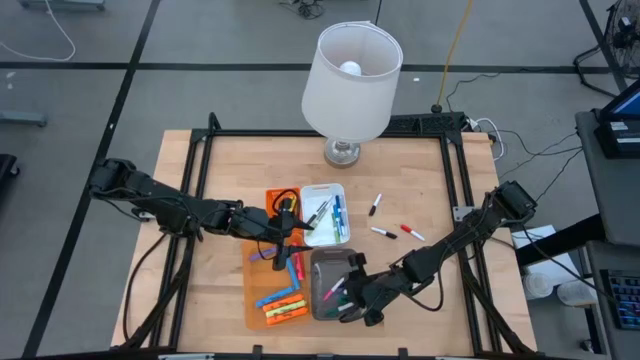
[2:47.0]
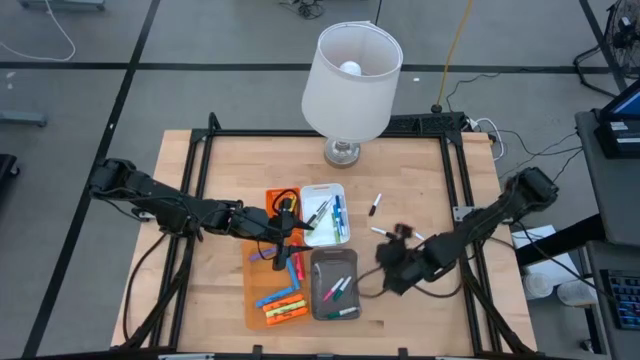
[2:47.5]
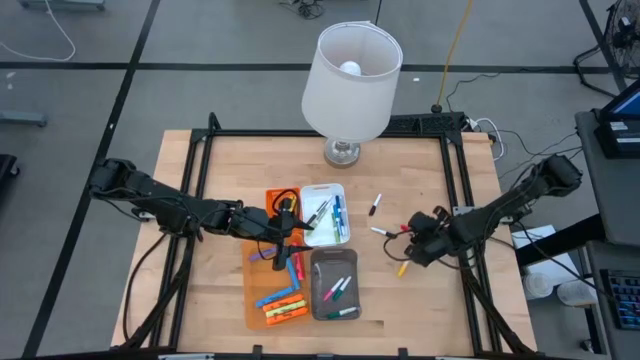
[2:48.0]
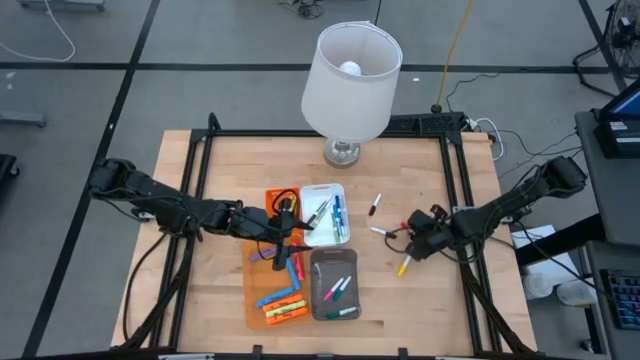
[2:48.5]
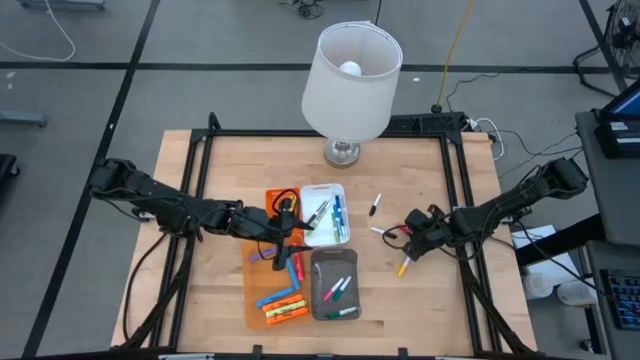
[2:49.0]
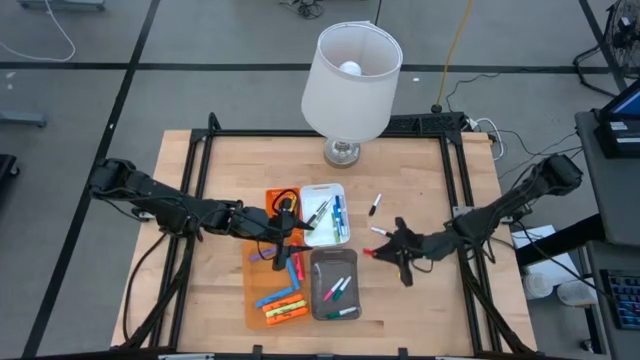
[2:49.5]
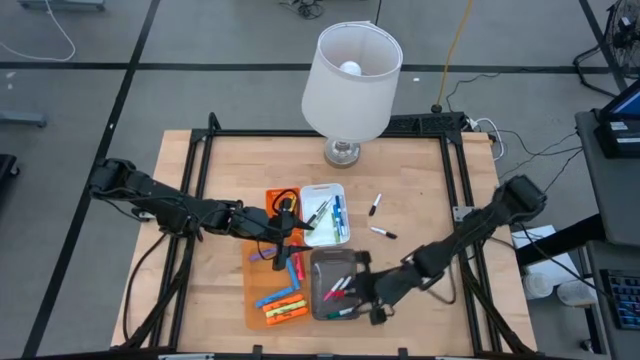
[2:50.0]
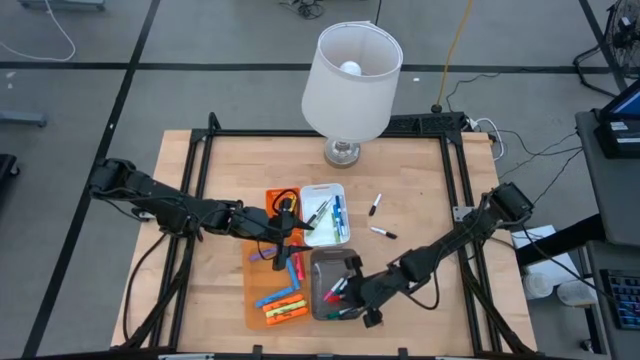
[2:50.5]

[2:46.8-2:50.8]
Task: Pick & Place Markers
Put the red small highlighter pen into the black bin

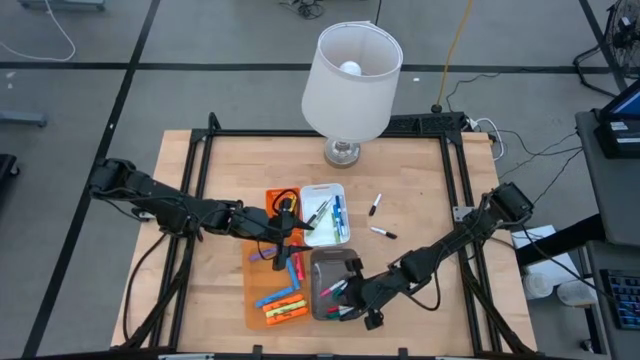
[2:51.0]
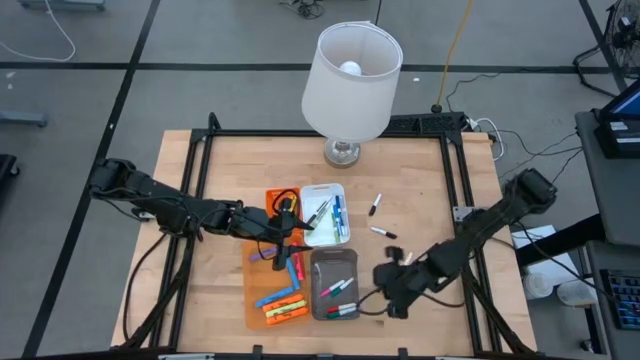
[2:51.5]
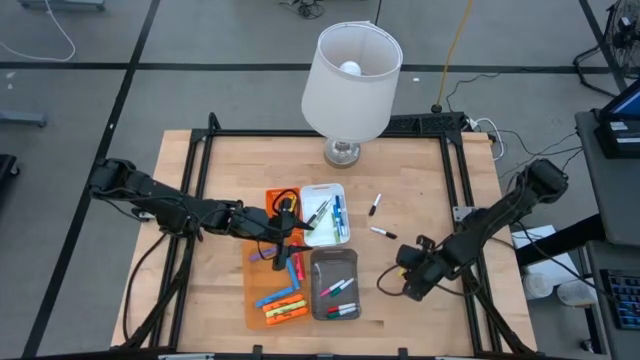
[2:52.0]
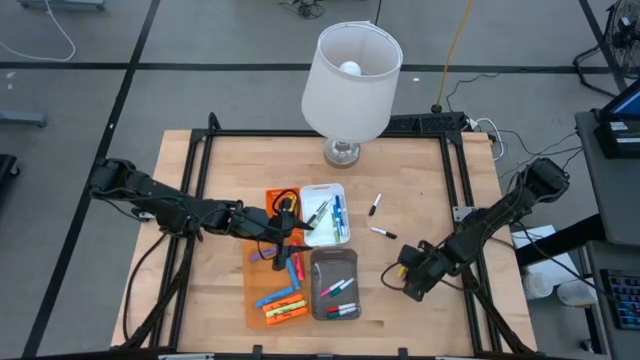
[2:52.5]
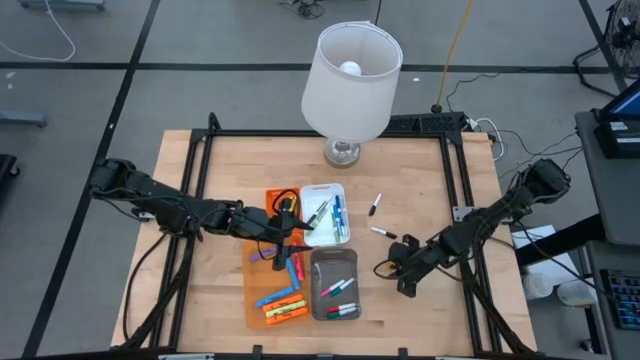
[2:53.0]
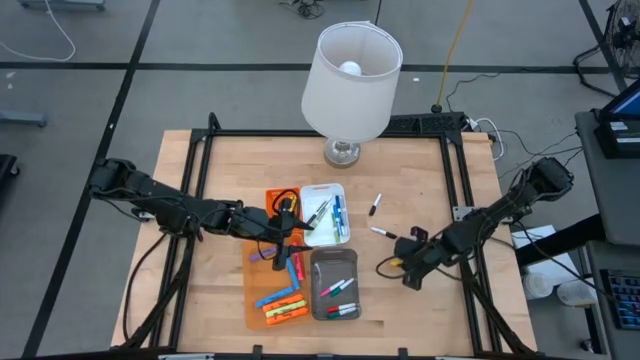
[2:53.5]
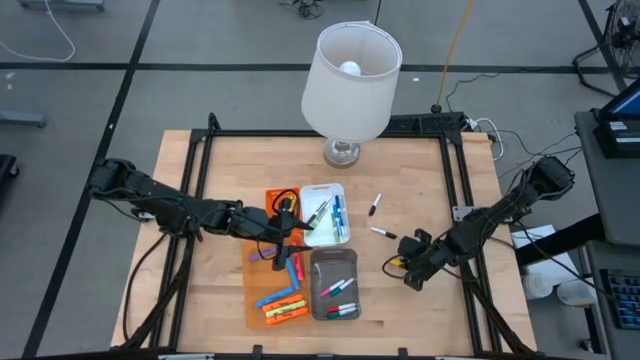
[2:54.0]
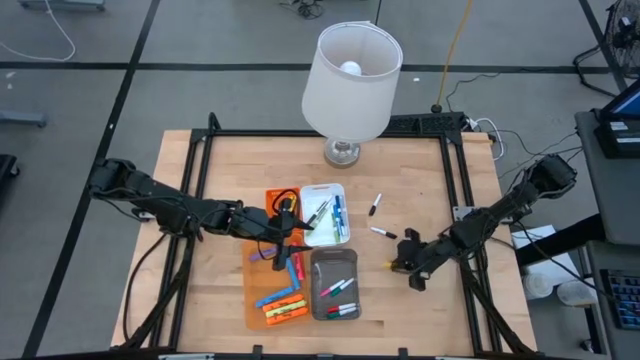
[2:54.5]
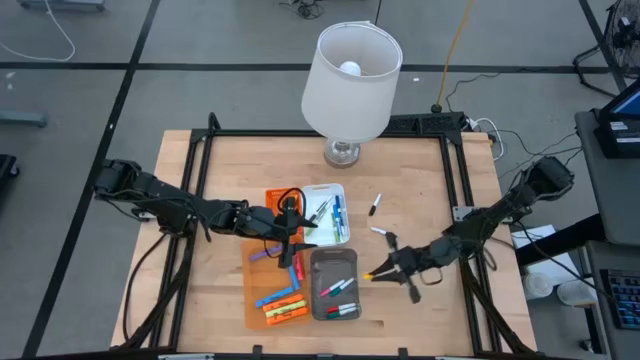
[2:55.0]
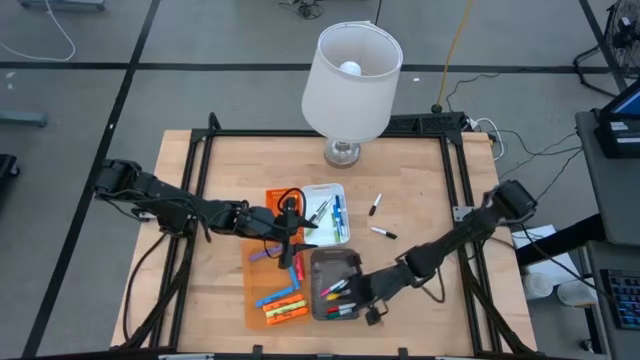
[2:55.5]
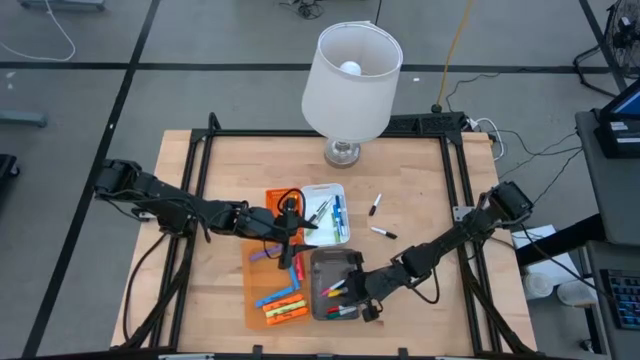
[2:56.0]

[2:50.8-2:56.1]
Put the yellow small highlighter pen into the black bin

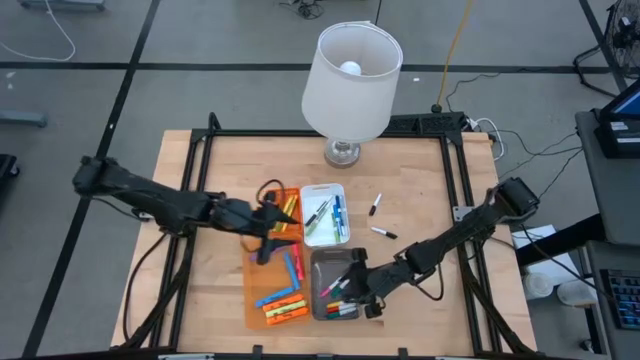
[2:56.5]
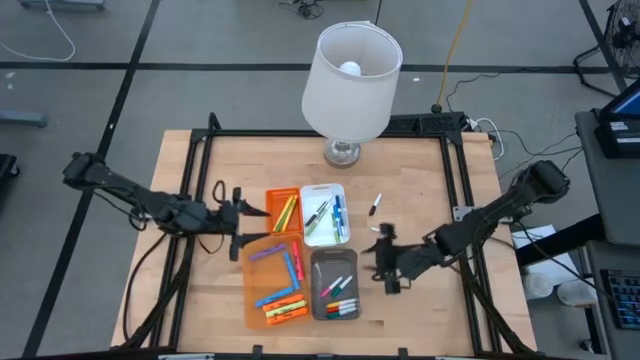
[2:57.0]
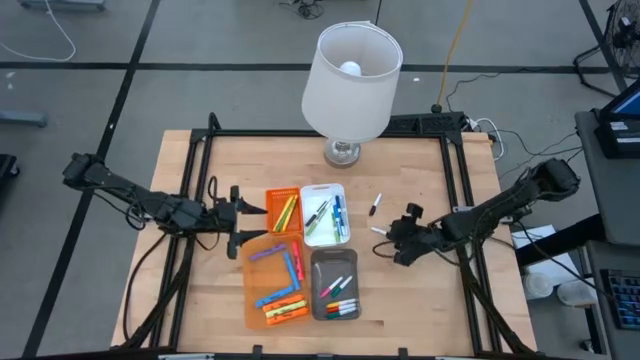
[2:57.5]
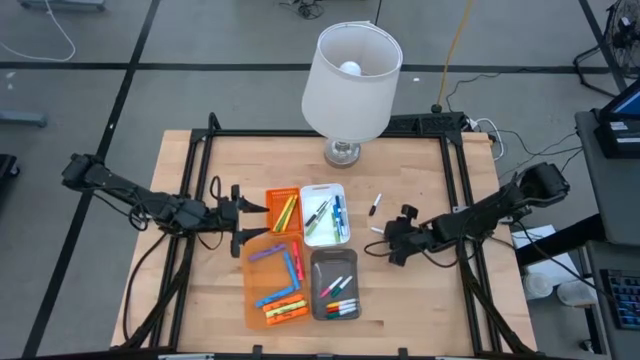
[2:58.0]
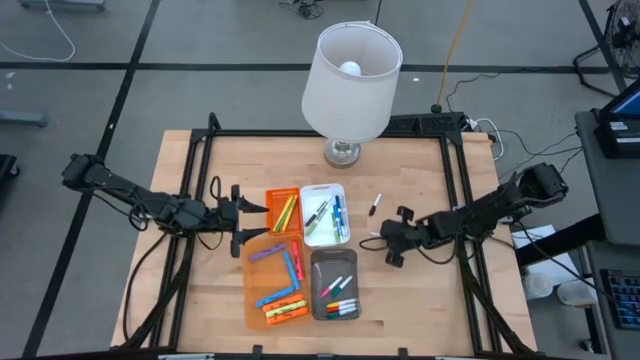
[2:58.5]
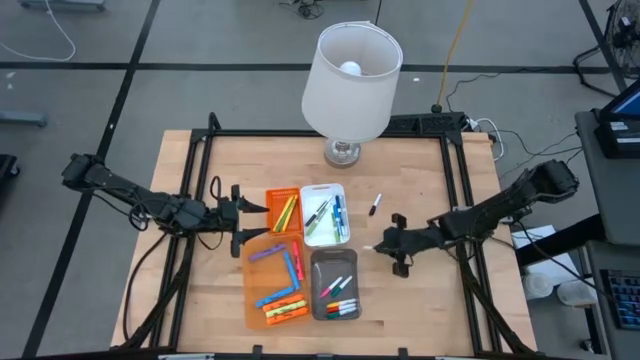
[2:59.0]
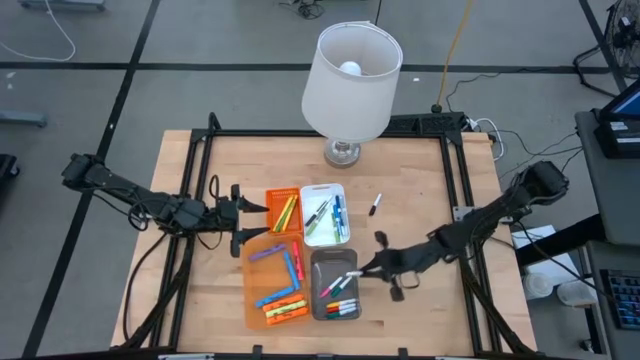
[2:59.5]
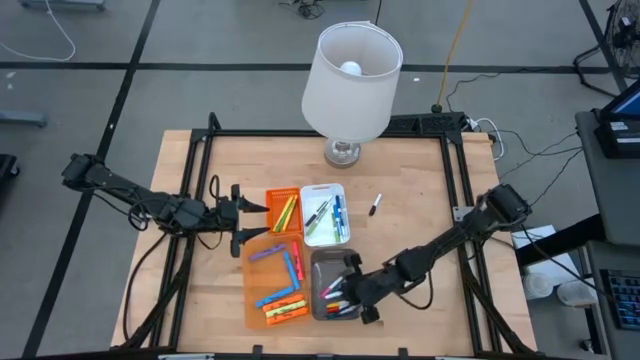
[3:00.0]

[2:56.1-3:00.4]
Put the bottom black small highlighter pen into the black bin

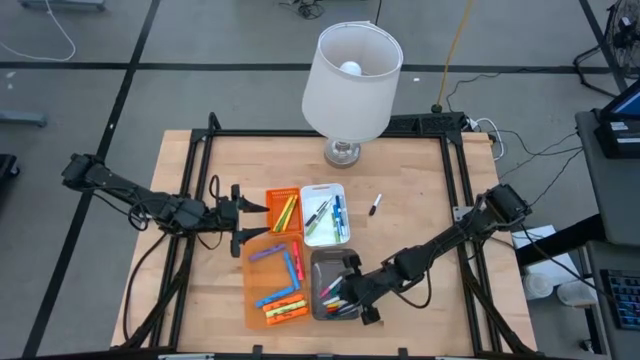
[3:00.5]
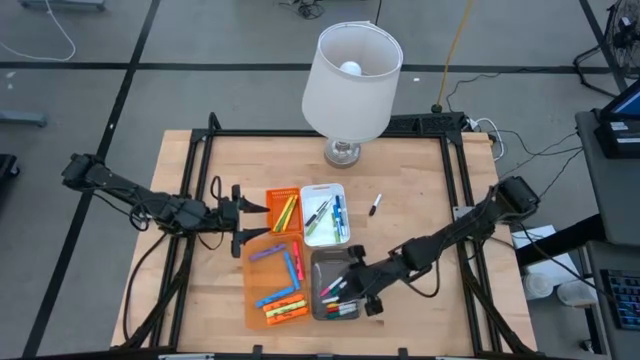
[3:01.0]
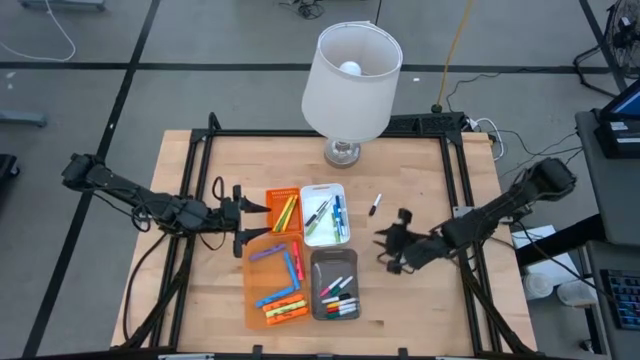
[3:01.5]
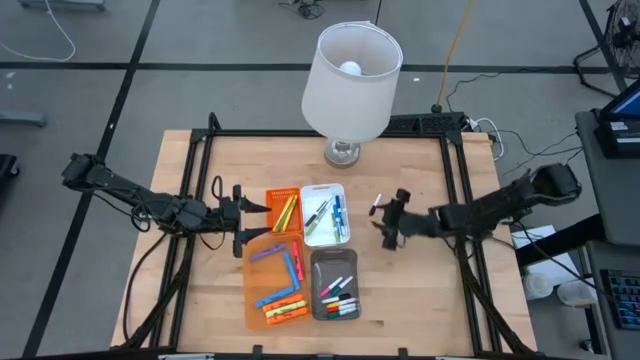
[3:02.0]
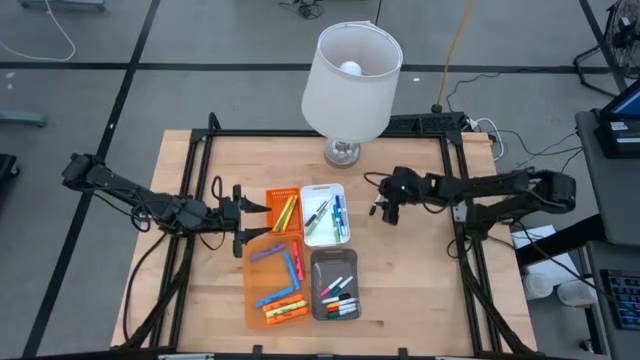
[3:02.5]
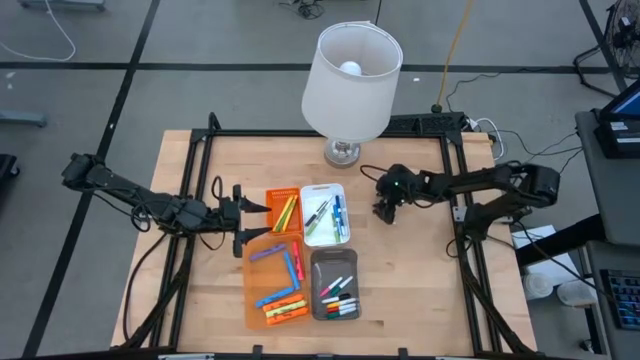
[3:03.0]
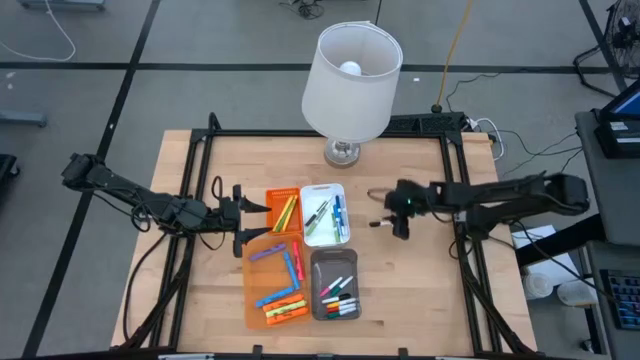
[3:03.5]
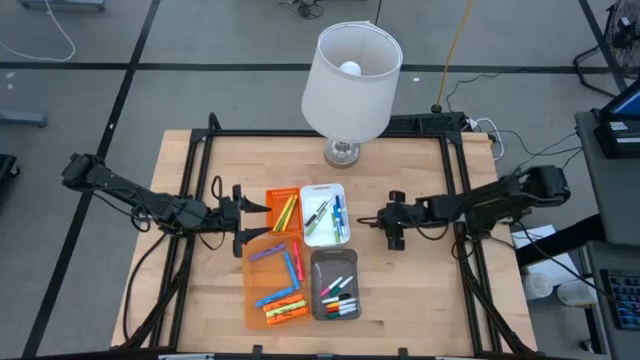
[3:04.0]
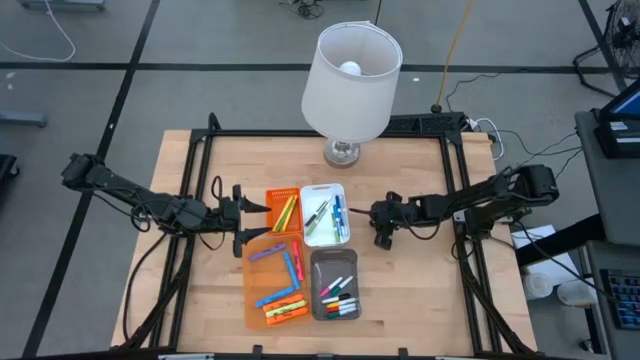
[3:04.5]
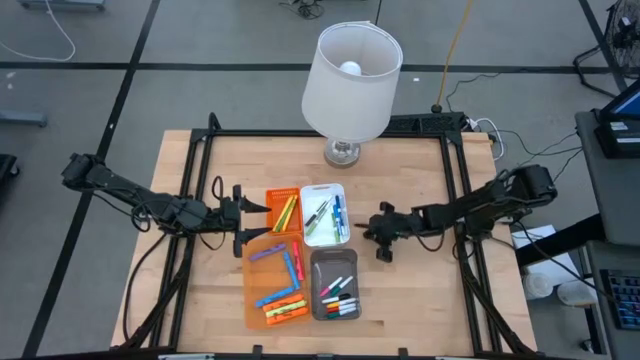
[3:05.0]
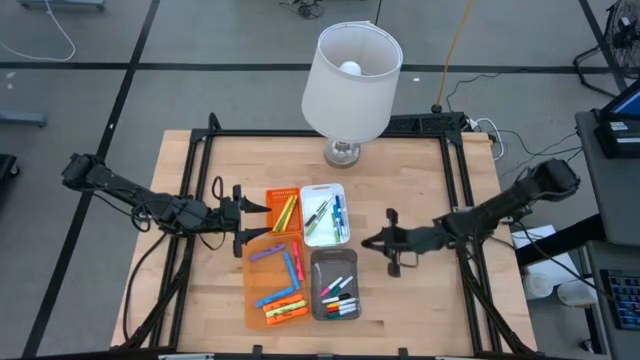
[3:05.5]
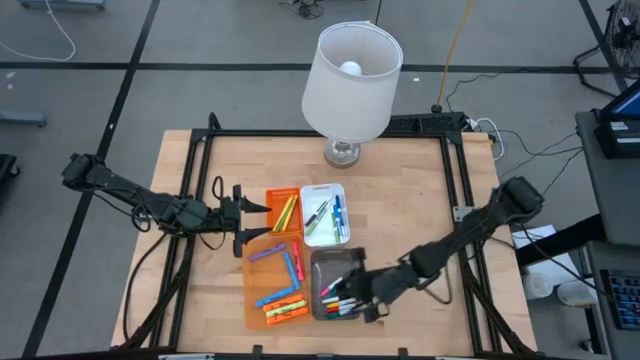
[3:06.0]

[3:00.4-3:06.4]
Put the black small highlighter pen into the black bin
